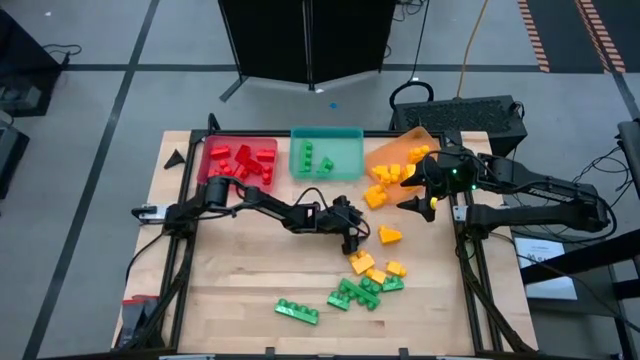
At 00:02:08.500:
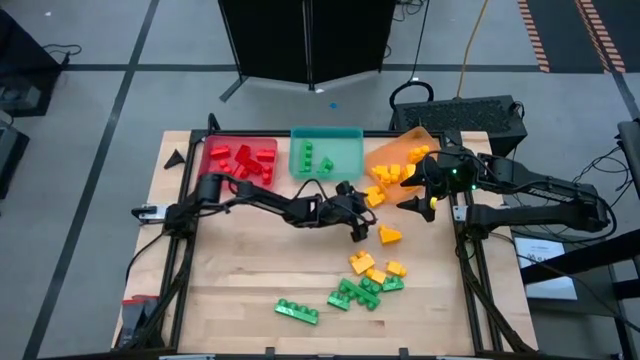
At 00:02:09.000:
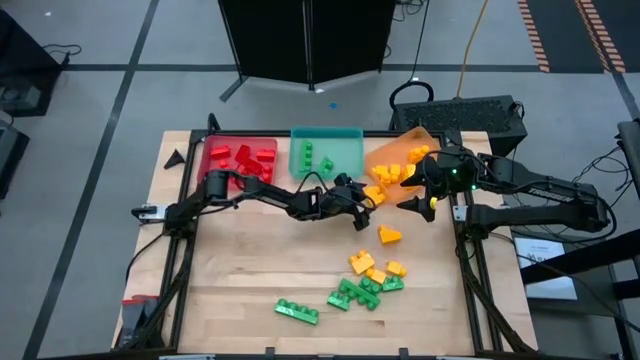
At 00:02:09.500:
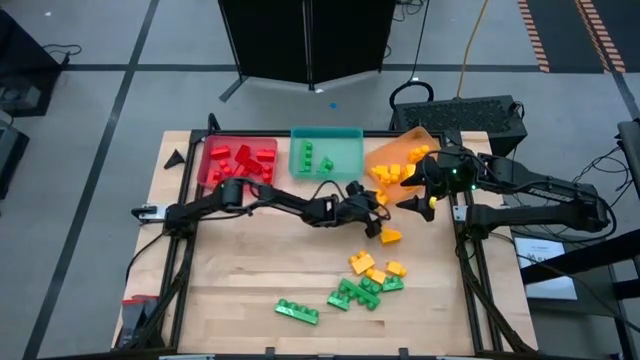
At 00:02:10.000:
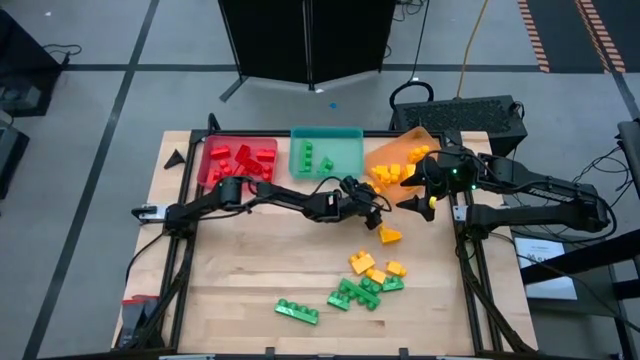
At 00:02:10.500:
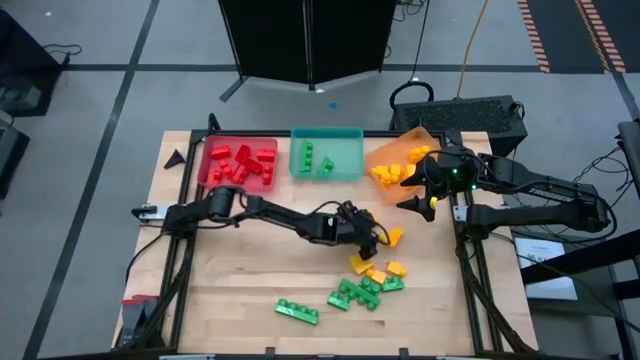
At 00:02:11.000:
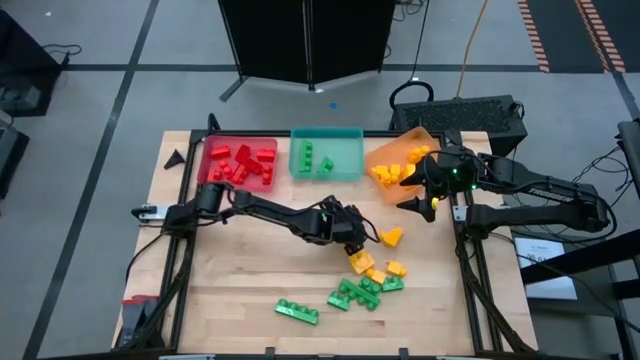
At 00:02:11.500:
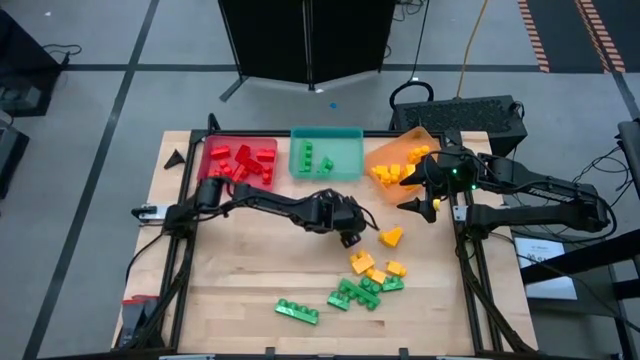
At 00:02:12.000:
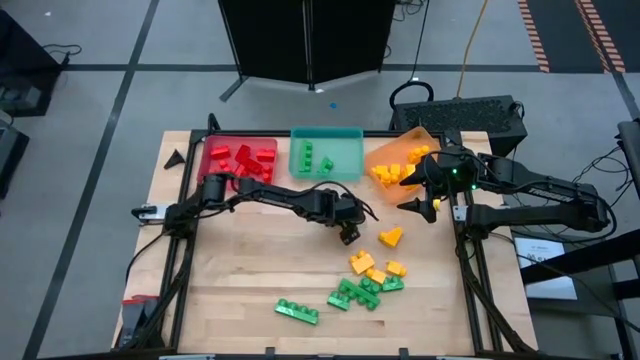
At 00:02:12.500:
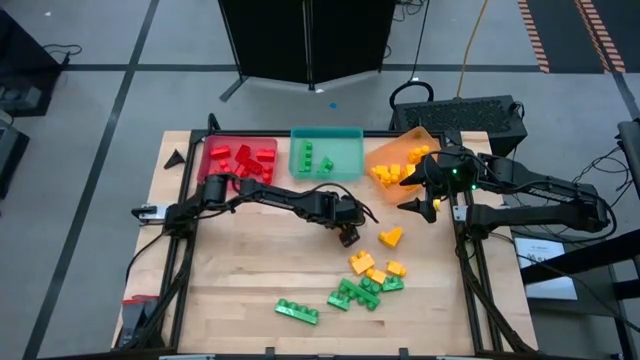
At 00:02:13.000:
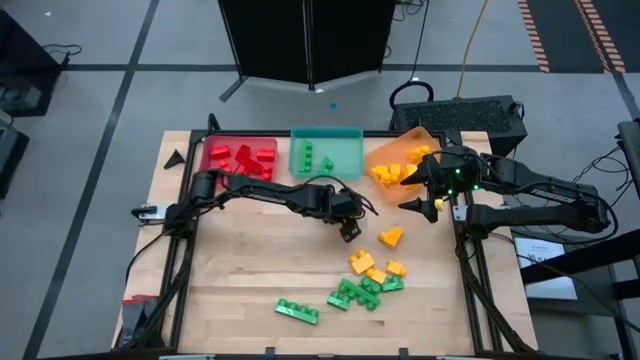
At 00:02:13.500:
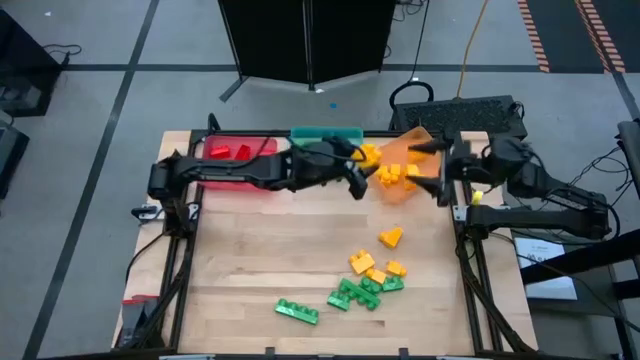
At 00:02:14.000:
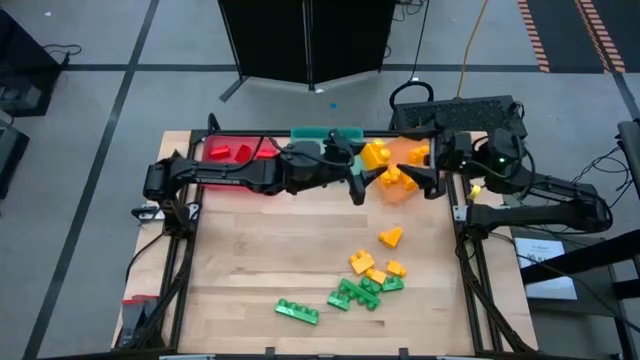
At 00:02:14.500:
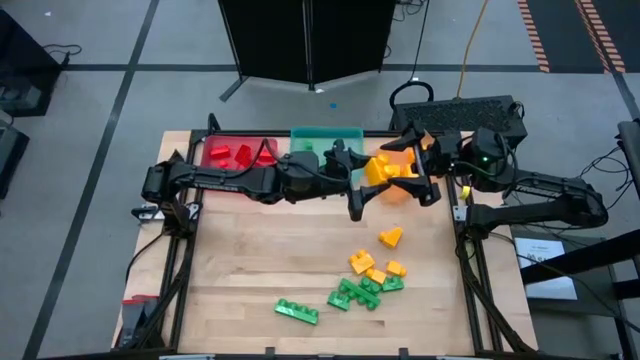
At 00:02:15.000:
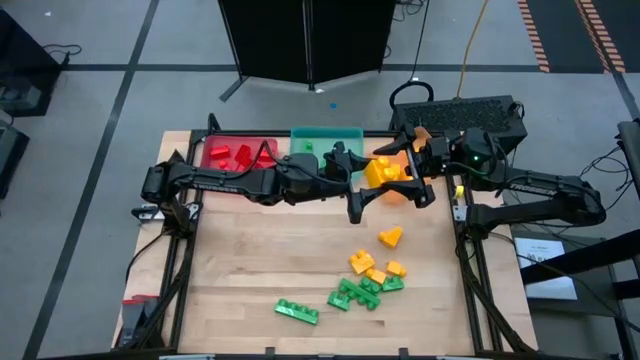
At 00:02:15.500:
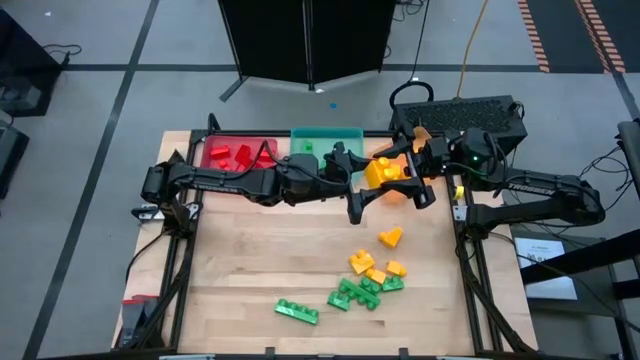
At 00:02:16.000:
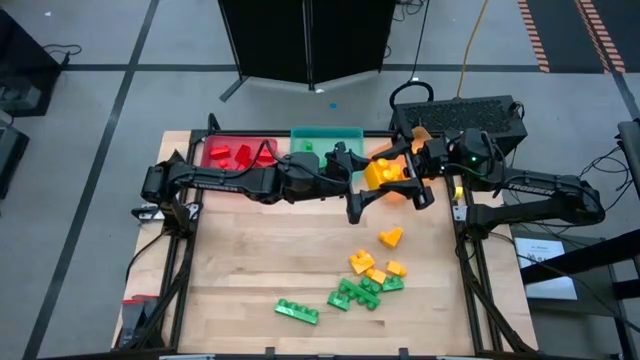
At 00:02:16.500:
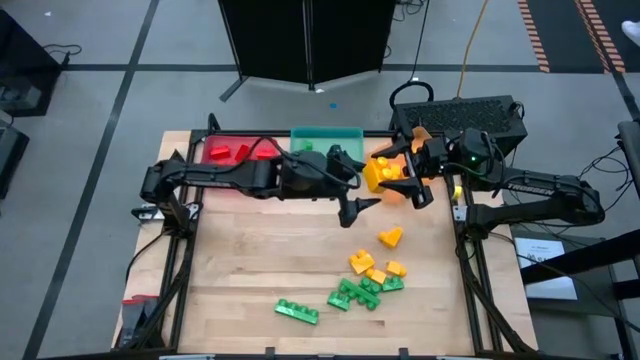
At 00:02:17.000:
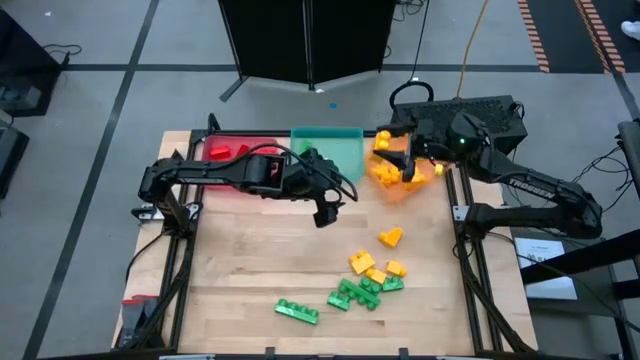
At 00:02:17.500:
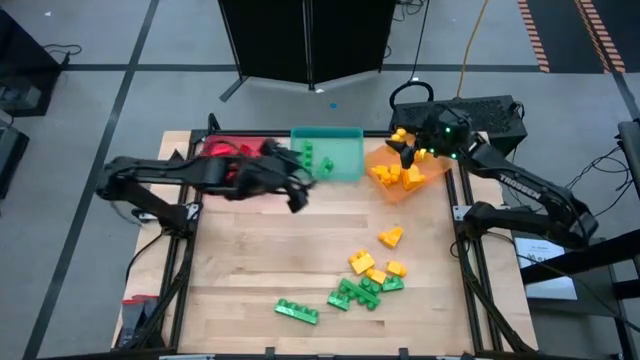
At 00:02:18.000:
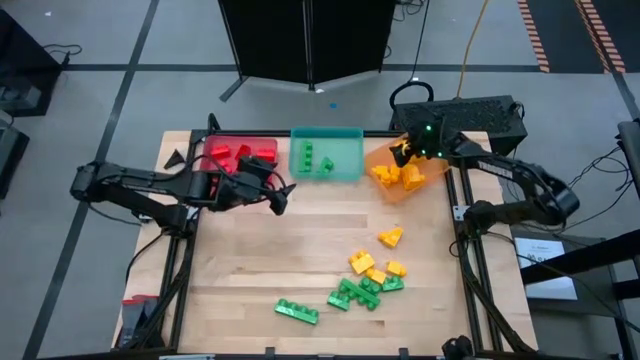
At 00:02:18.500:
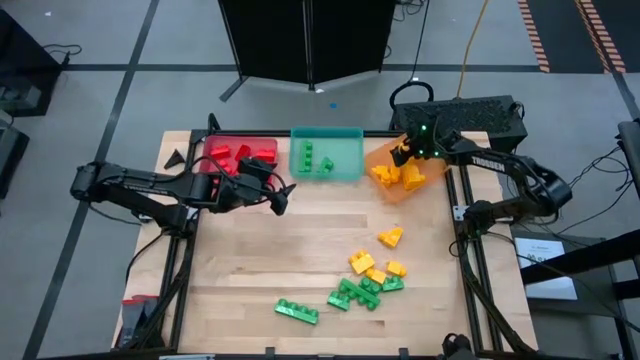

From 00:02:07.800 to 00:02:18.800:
Task: Sort blocks
Put the yellow game piece into the orange bin

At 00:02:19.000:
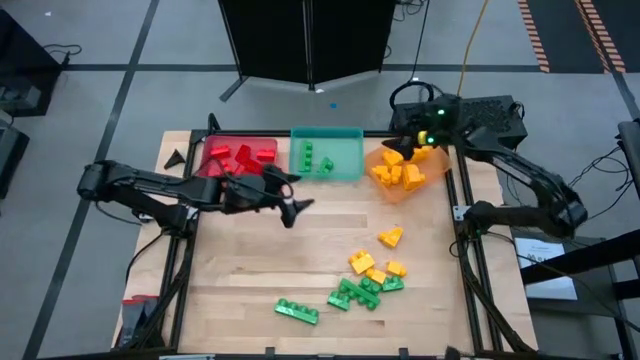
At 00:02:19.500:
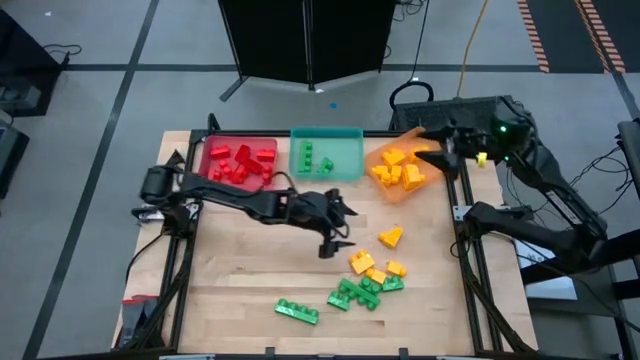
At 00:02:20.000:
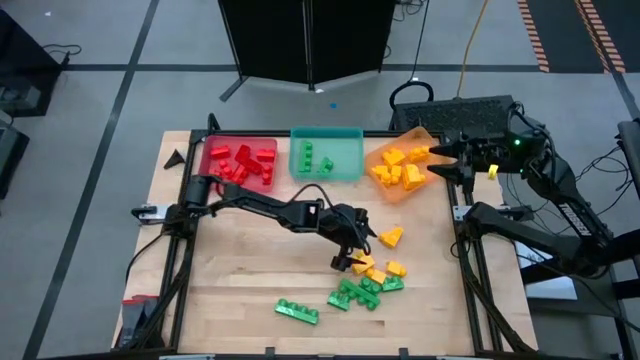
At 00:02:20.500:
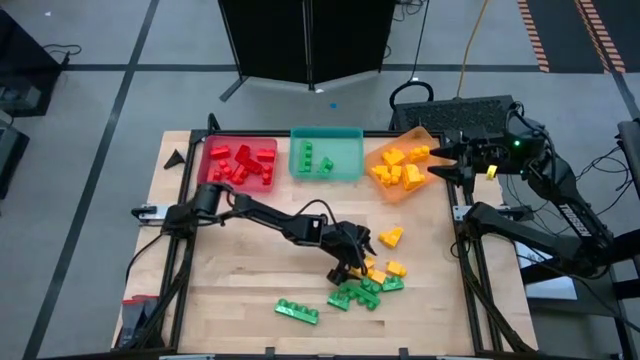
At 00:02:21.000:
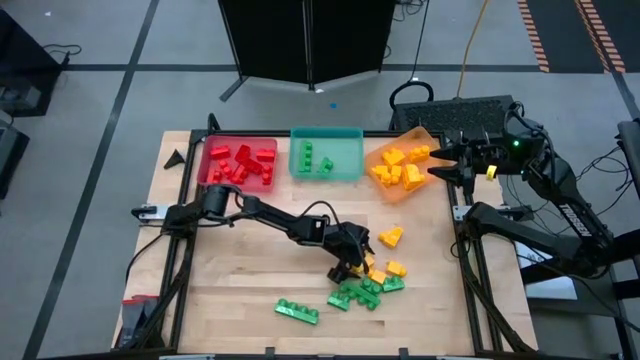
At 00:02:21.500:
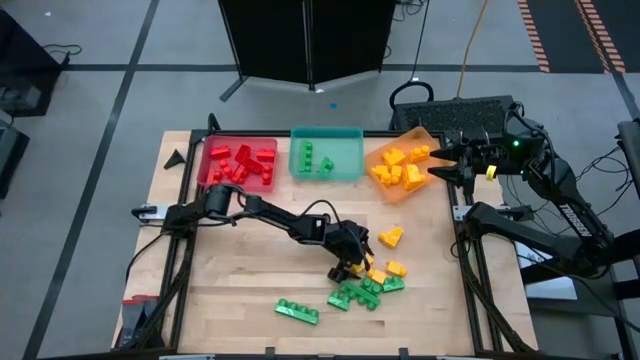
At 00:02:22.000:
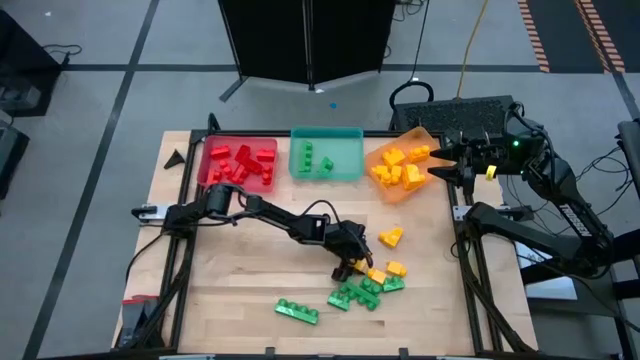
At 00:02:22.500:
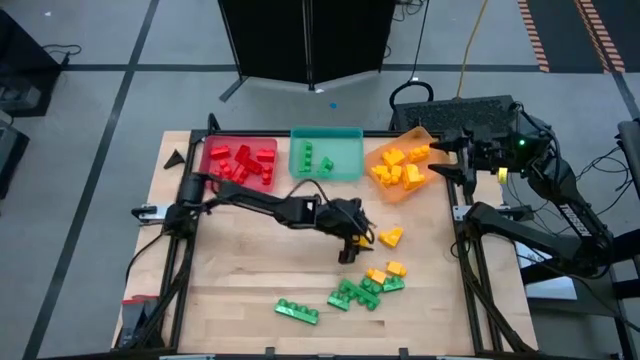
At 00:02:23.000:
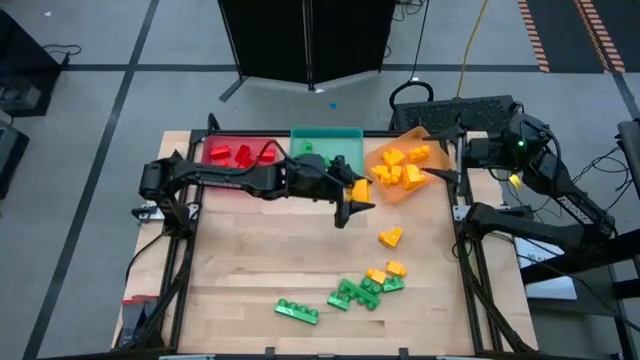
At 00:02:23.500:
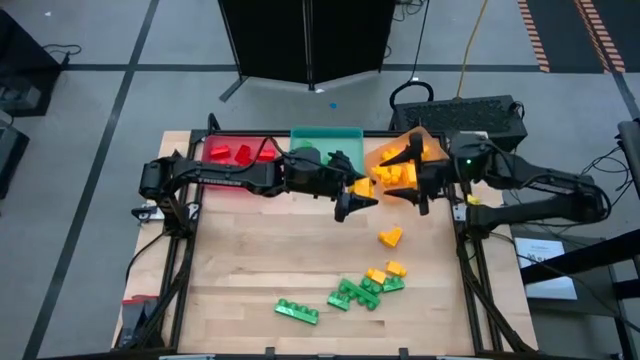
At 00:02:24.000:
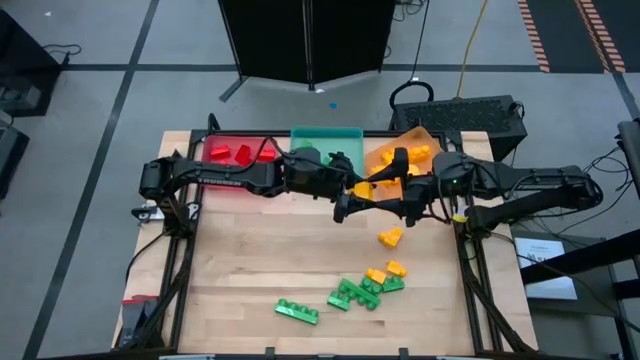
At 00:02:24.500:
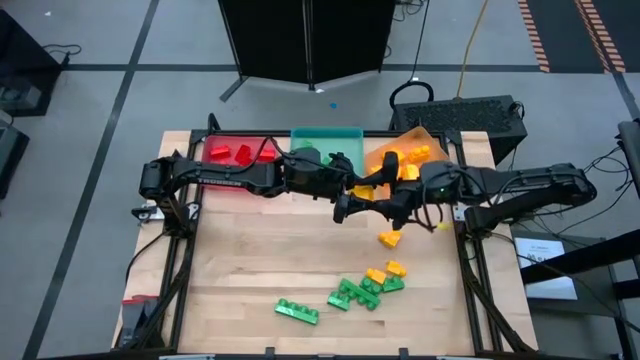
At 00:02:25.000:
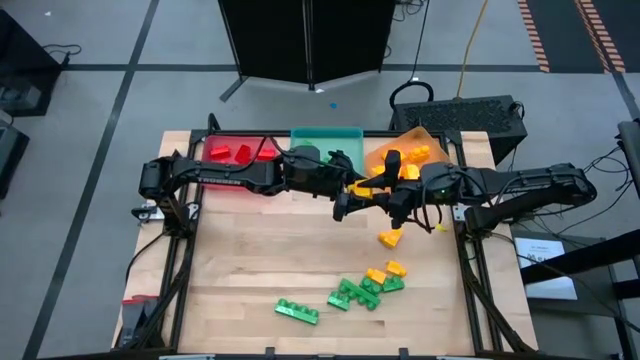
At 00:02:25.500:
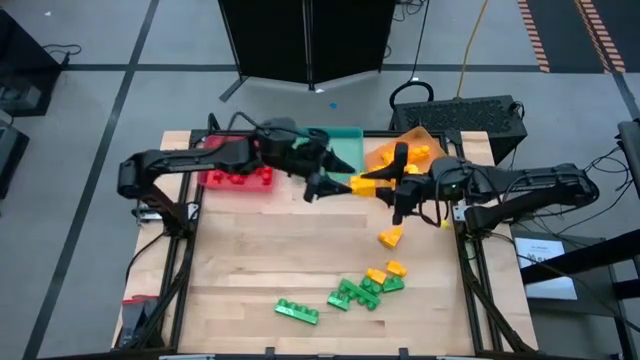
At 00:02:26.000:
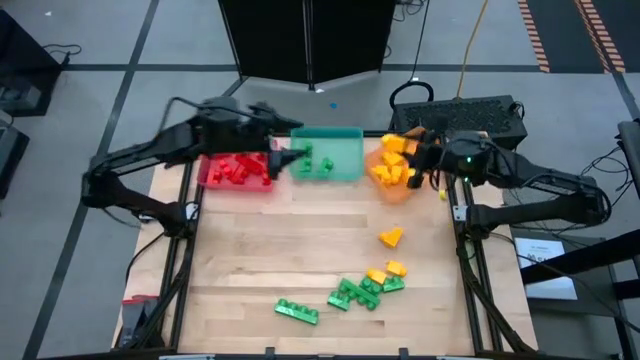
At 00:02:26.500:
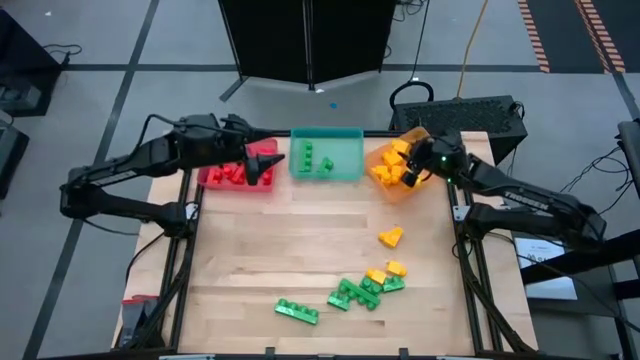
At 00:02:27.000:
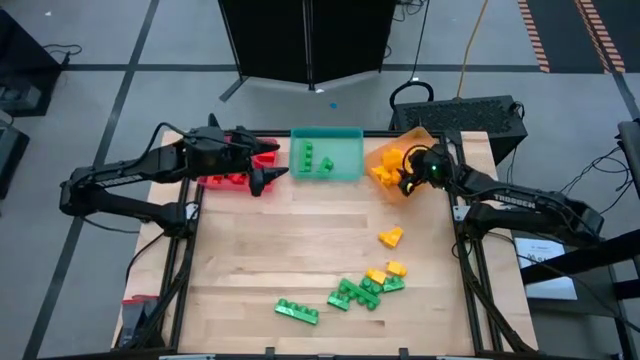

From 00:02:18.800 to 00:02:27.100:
Put the yellow game piece into the orange bin

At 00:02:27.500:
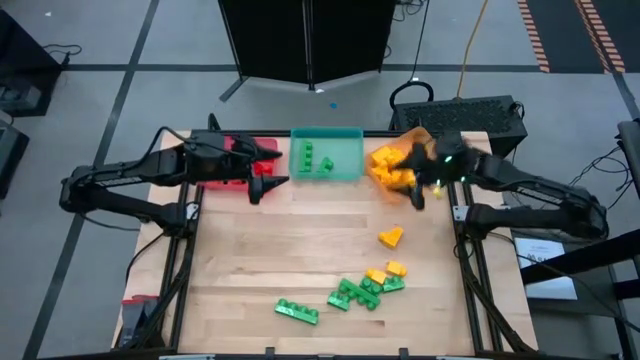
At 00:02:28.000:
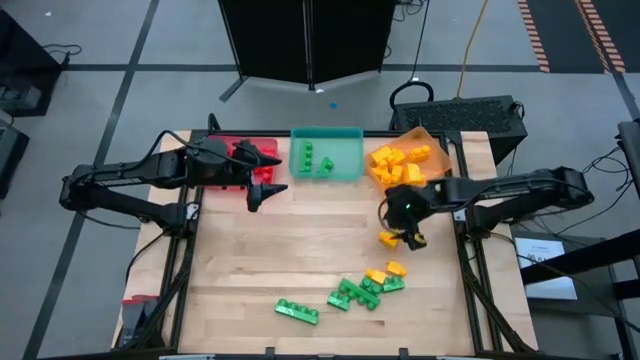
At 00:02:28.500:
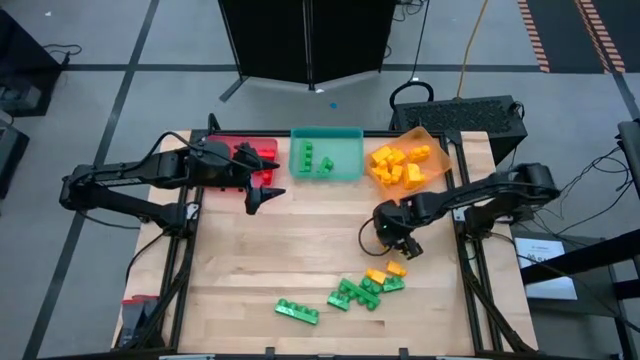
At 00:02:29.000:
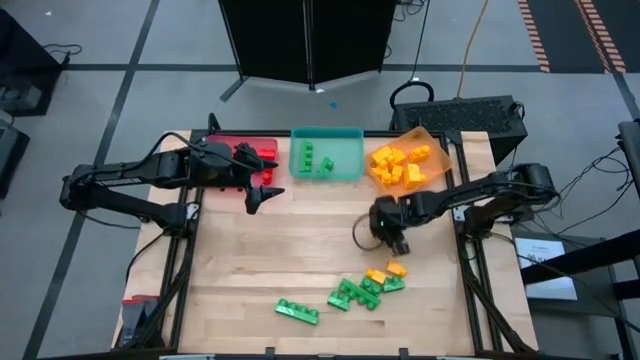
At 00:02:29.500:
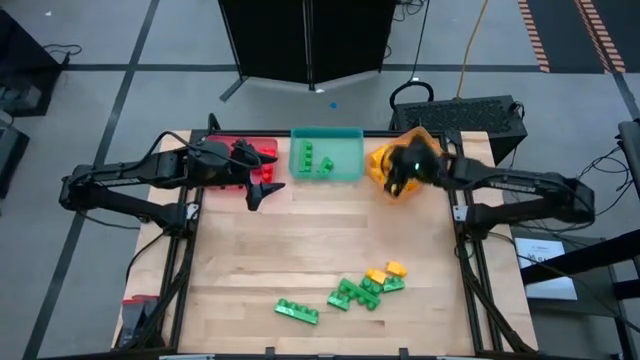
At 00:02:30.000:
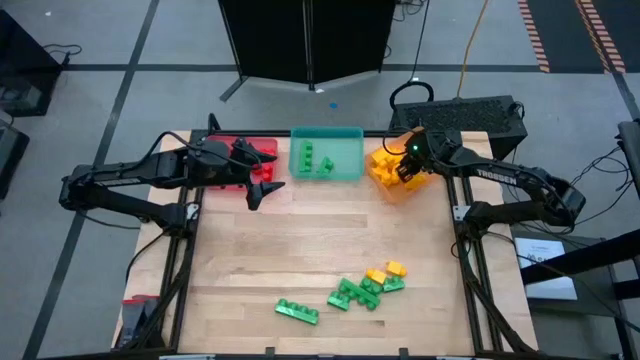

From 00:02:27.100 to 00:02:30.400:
Put the yellow game piece into the orange bin
